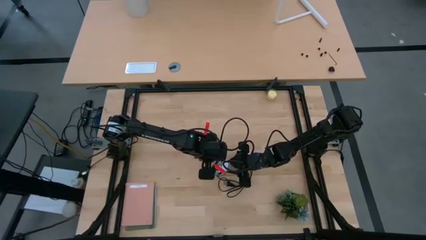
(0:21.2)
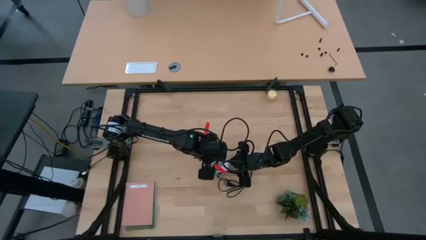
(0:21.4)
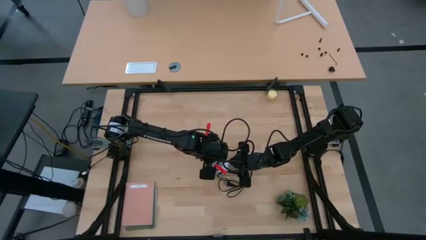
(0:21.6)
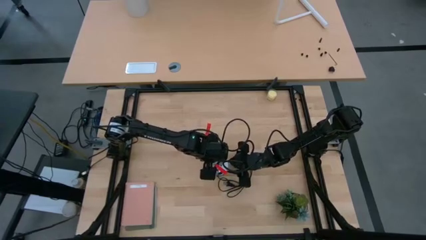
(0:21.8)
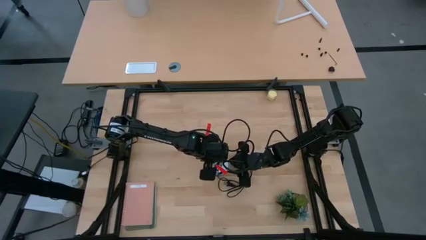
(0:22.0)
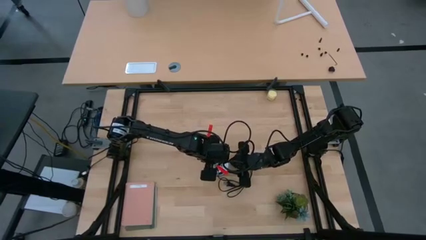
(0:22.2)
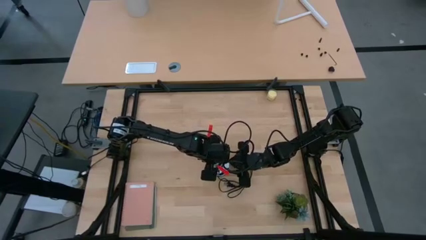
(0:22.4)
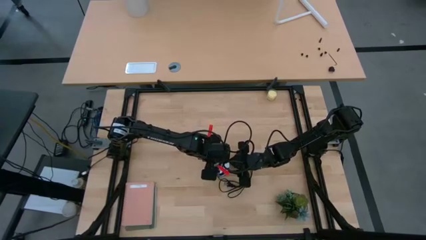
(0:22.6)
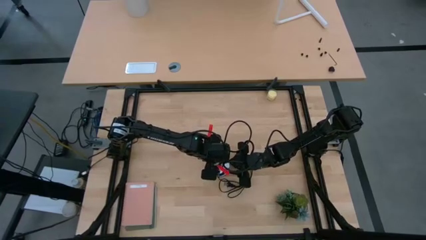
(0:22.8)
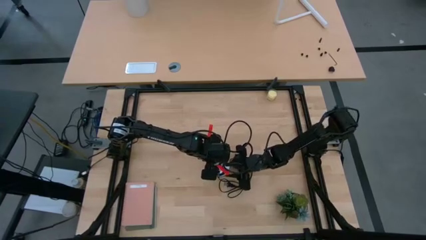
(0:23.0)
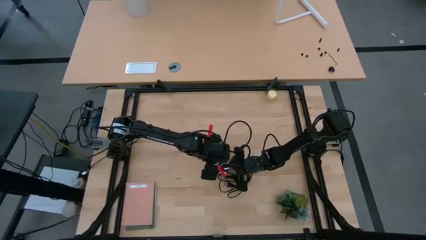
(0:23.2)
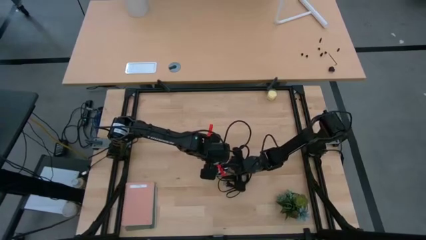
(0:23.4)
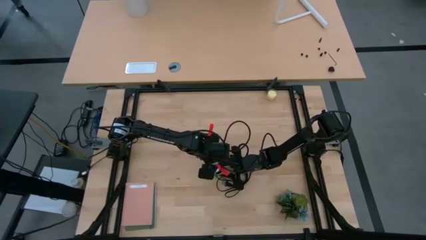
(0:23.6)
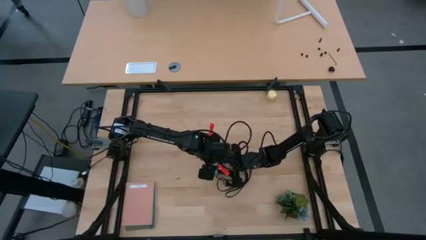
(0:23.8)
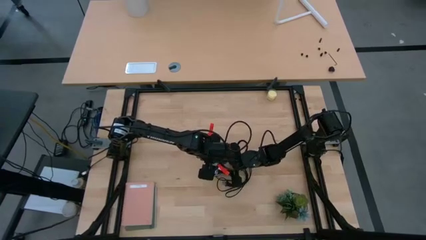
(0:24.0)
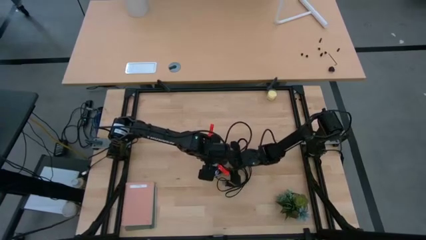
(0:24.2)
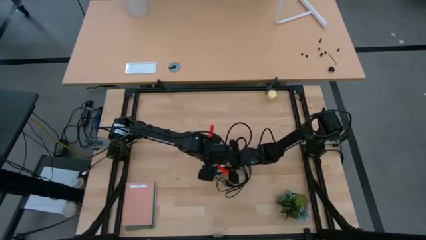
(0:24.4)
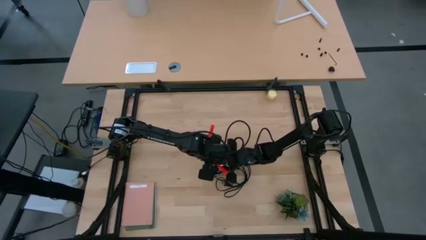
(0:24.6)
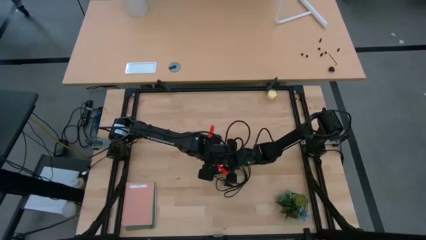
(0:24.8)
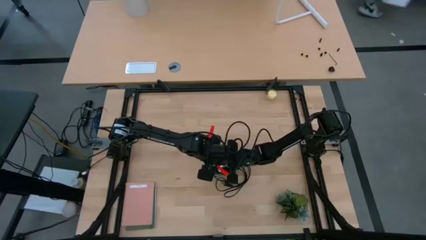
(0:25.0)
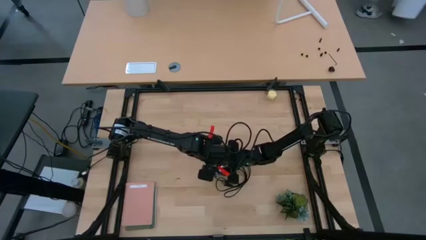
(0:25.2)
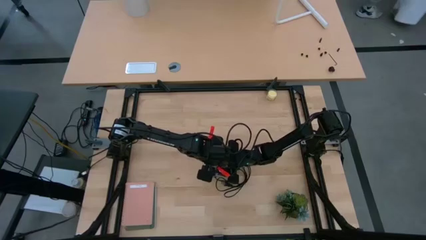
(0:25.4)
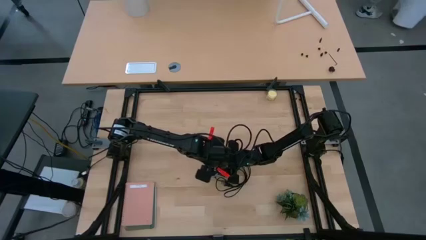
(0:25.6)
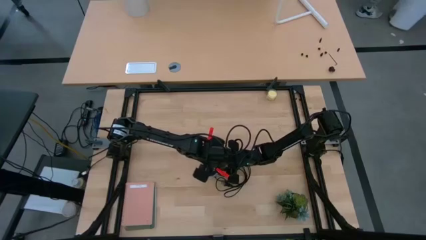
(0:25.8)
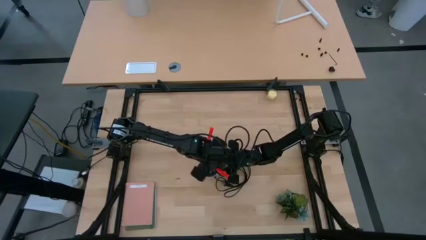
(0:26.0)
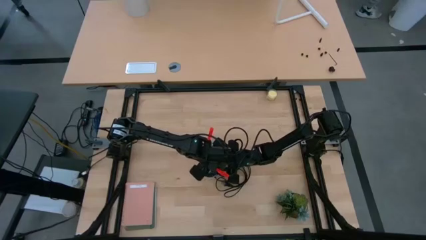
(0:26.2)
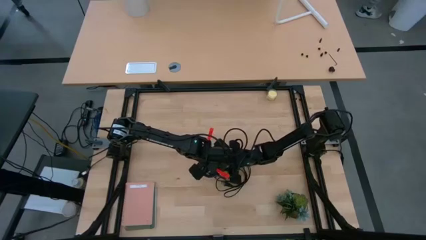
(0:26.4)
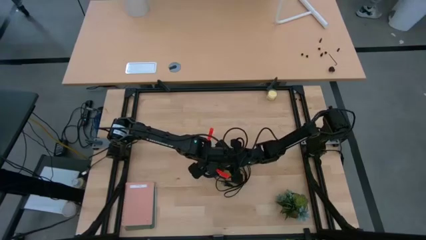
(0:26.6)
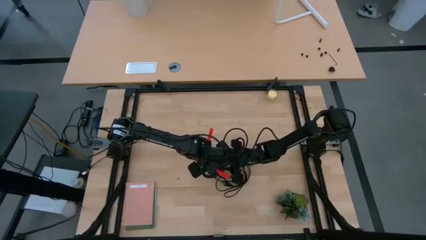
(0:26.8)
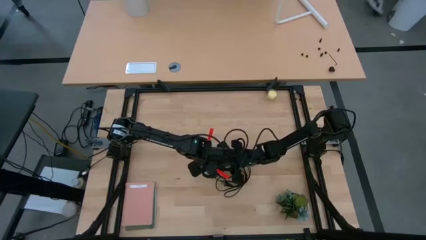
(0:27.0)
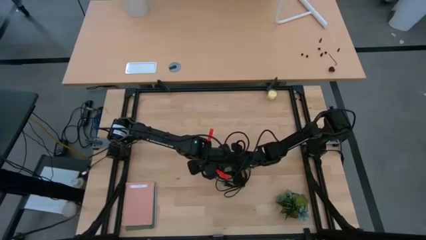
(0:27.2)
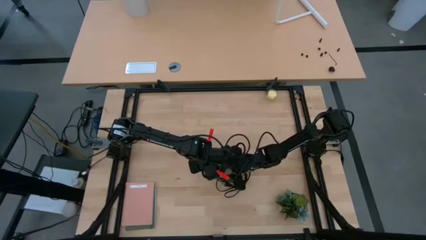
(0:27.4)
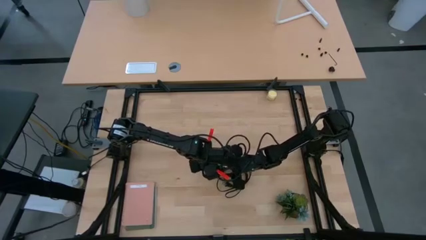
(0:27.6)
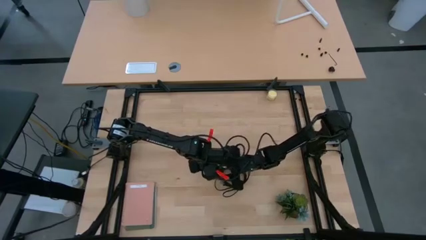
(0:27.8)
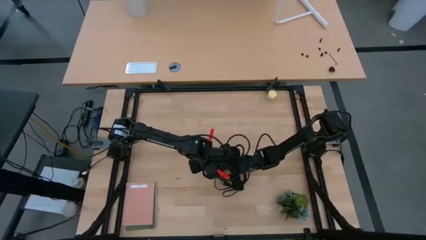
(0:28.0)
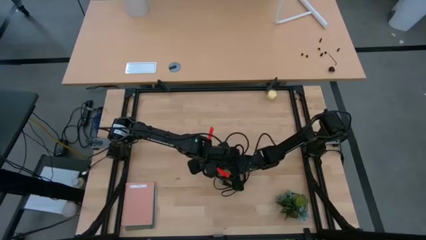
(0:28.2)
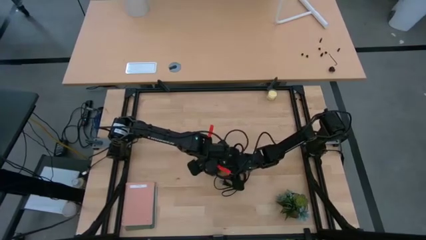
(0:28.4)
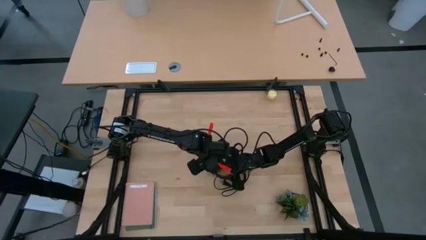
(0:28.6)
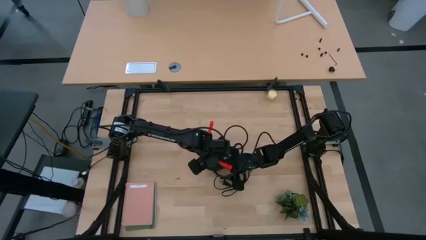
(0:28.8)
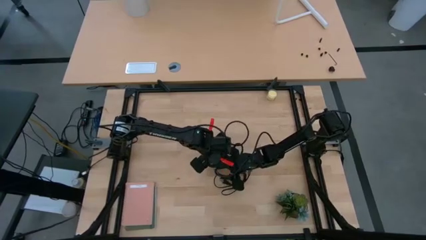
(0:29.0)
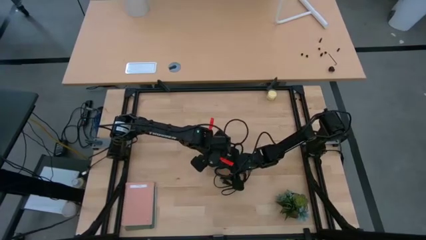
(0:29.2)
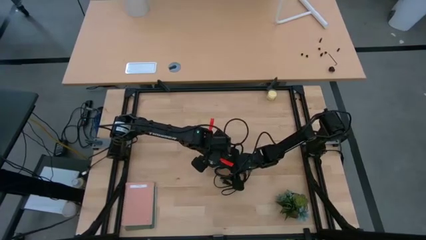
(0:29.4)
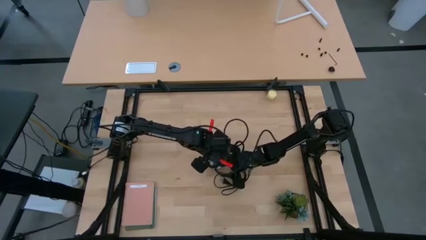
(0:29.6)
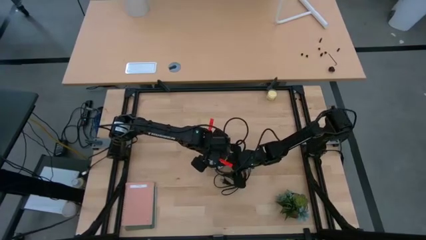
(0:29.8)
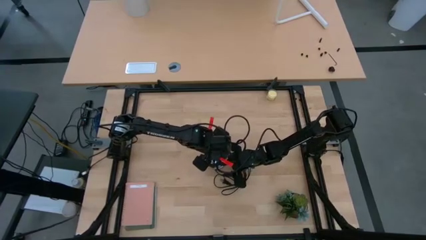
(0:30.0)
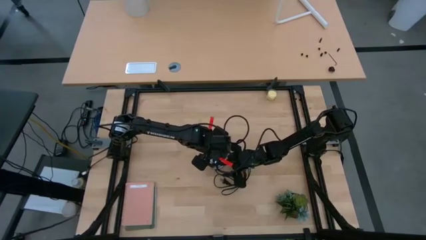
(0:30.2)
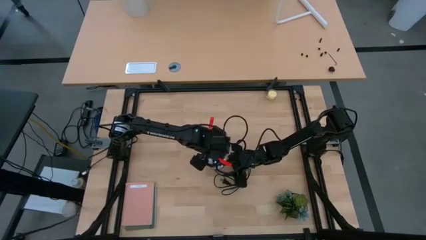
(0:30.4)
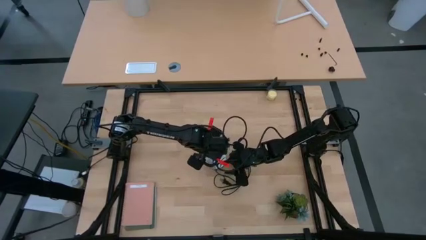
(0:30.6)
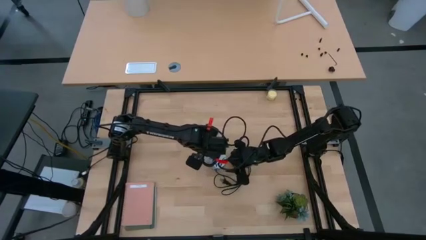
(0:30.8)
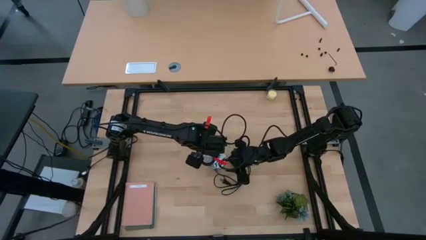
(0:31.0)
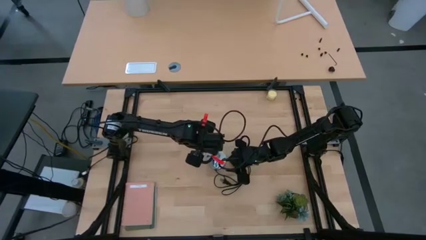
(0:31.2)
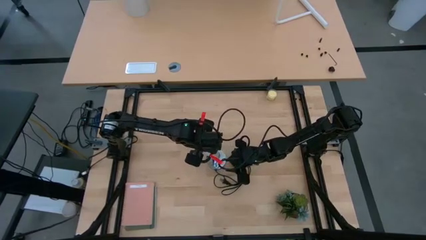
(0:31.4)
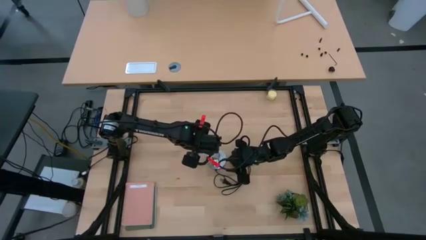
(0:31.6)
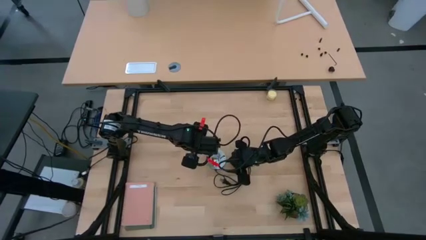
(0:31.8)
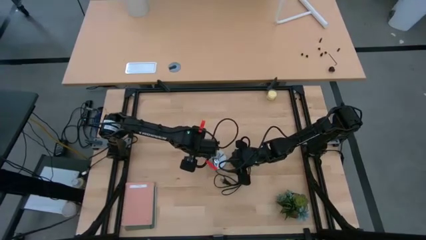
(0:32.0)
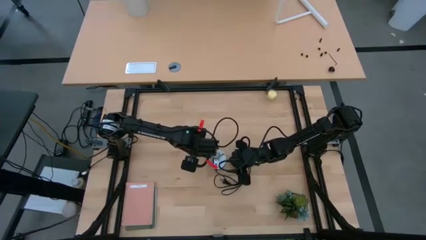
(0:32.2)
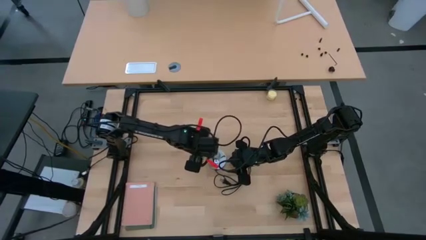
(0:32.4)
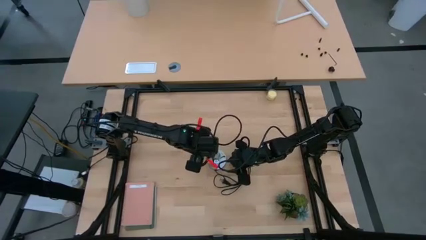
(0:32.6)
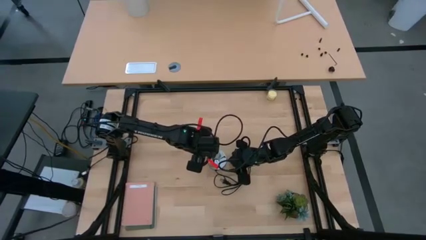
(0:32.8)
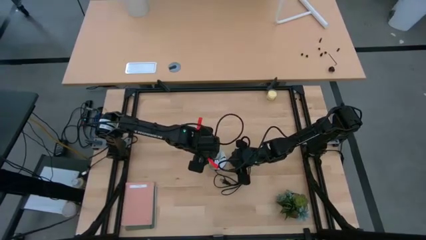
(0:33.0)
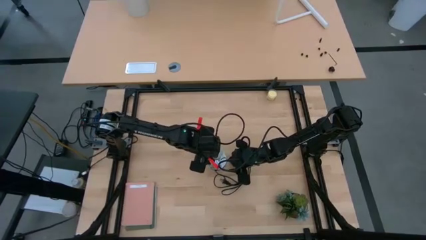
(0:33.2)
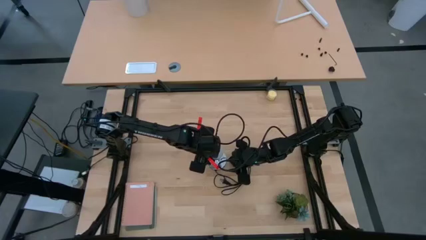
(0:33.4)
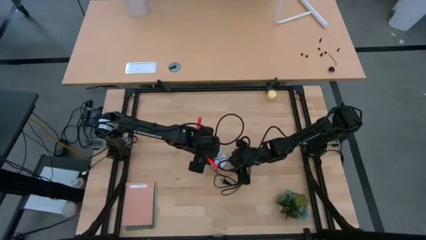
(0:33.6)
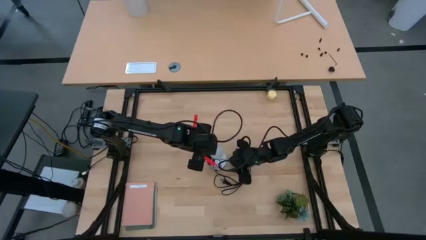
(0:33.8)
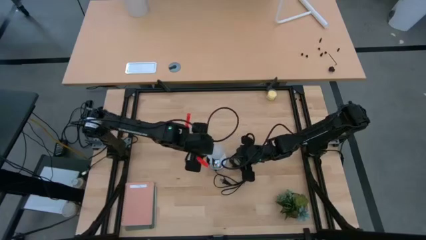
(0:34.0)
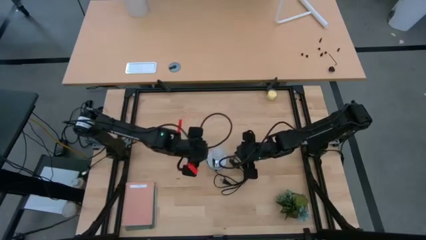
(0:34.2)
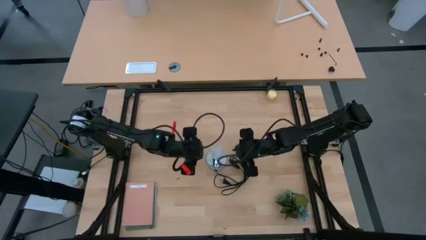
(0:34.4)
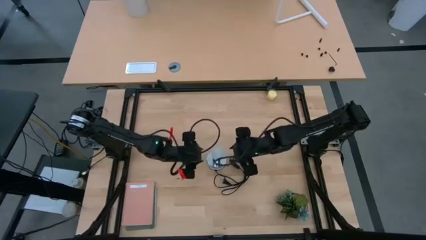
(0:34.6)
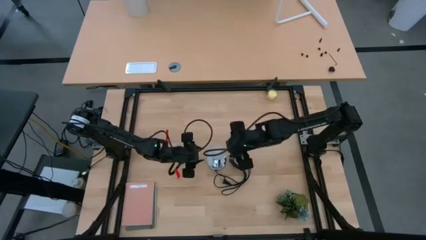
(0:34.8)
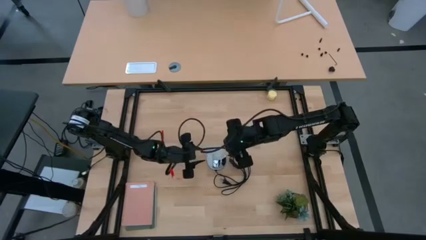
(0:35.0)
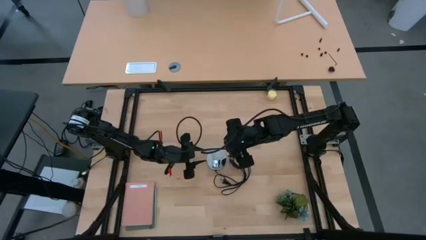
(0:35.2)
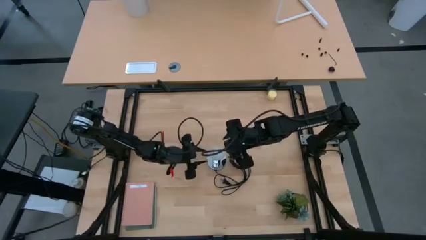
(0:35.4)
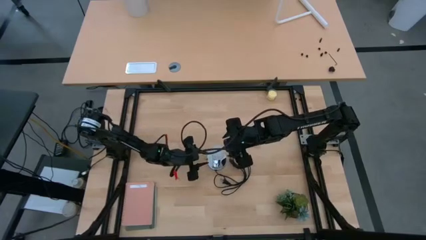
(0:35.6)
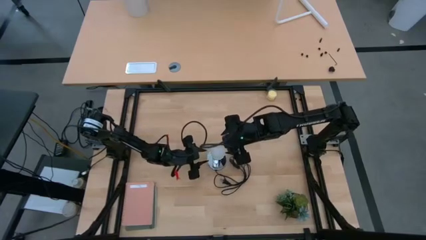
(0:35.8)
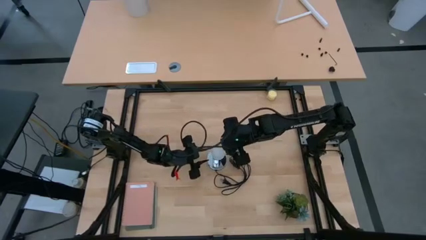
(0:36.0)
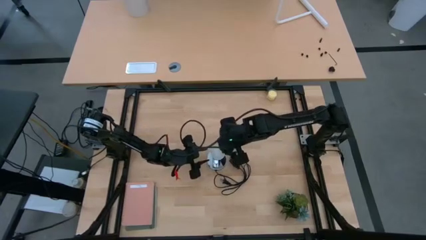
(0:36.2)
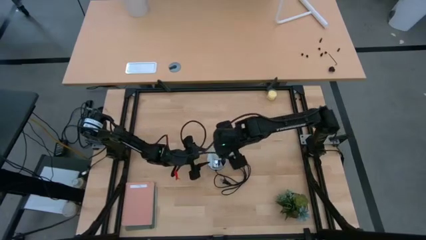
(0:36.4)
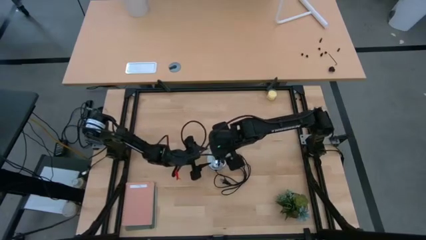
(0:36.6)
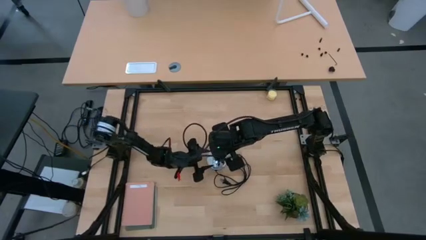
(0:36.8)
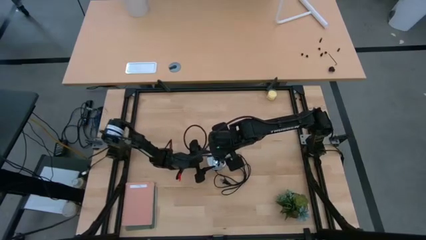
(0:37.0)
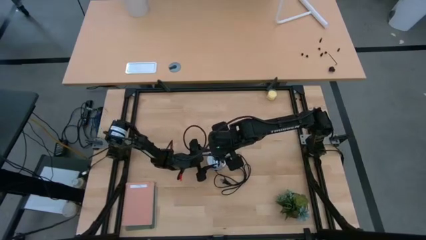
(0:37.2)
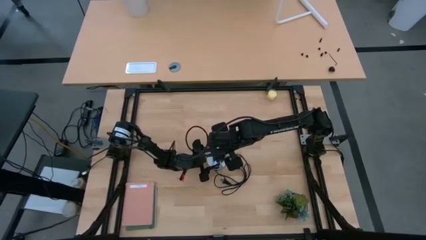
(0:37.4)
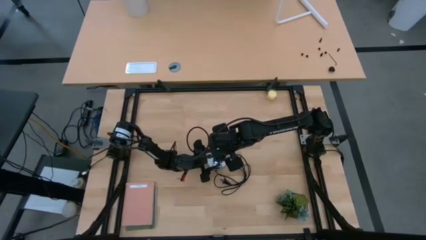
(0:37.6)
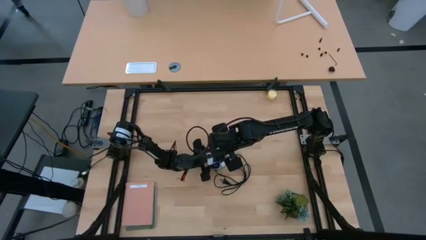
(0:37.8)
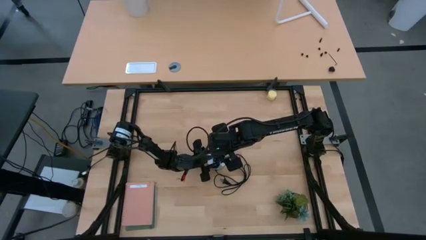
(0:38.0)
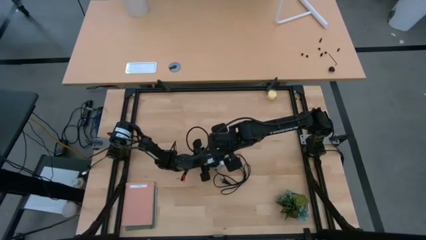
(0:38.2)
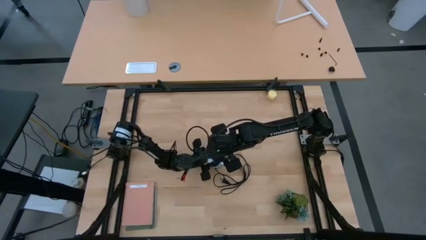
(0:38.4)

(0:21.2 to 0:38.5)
Task: Screw lightbulb
Insert the white lightbulb into the silver lamp
